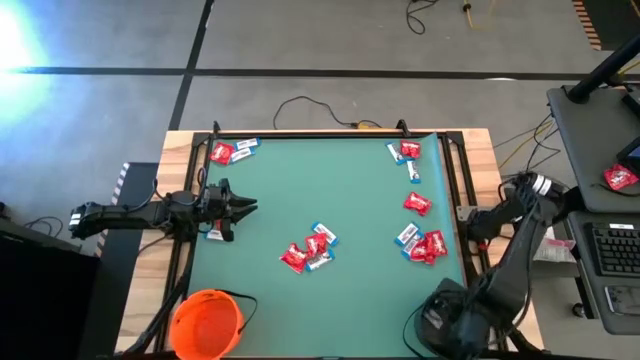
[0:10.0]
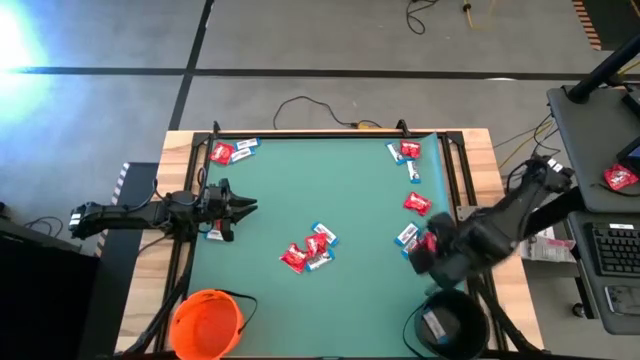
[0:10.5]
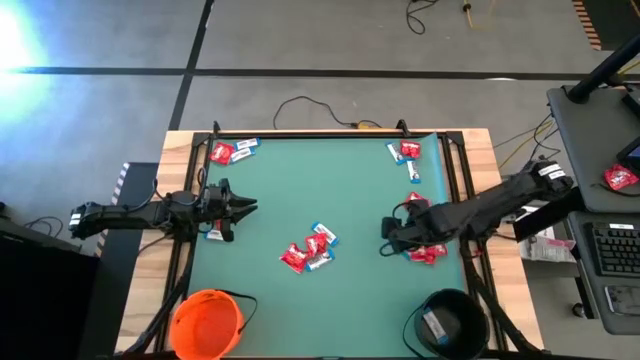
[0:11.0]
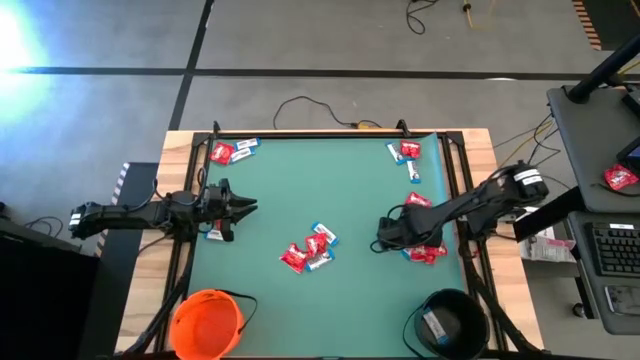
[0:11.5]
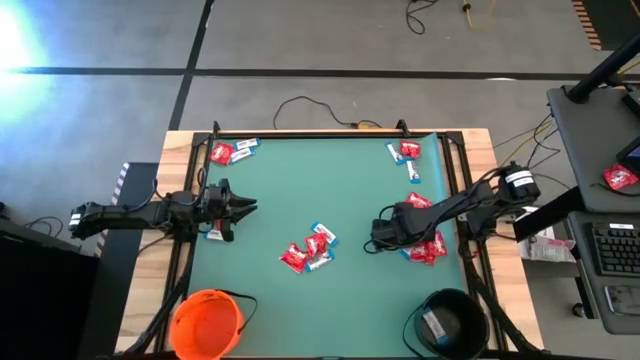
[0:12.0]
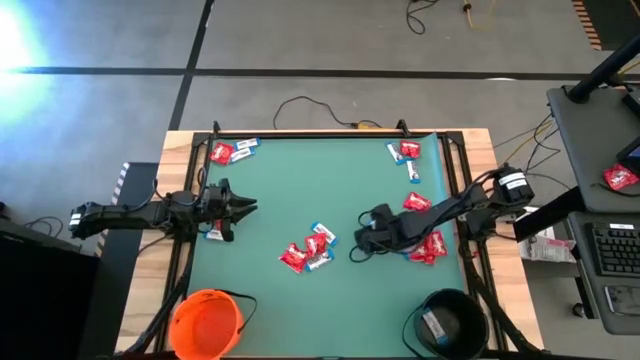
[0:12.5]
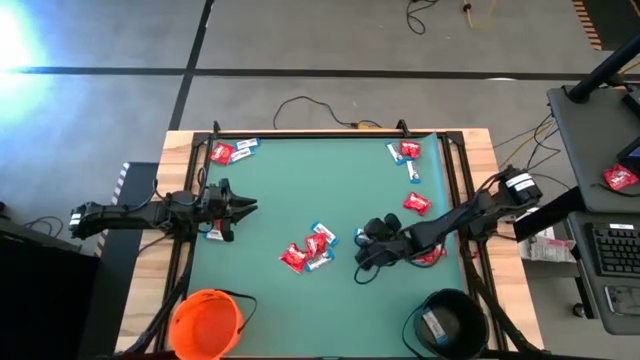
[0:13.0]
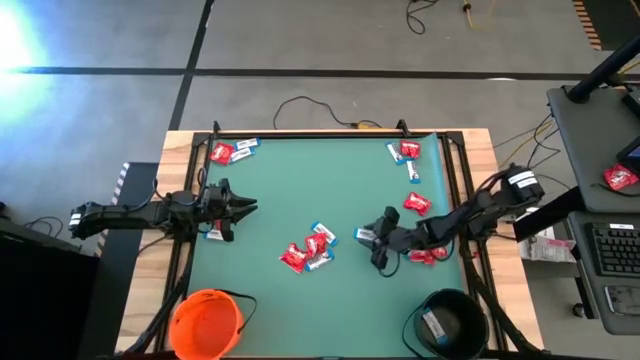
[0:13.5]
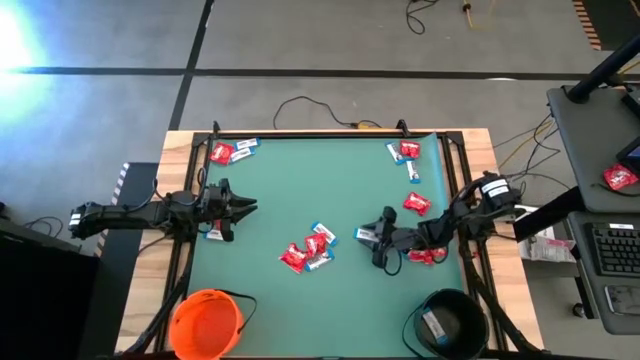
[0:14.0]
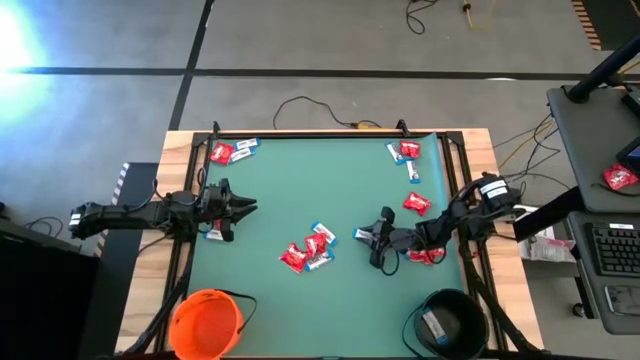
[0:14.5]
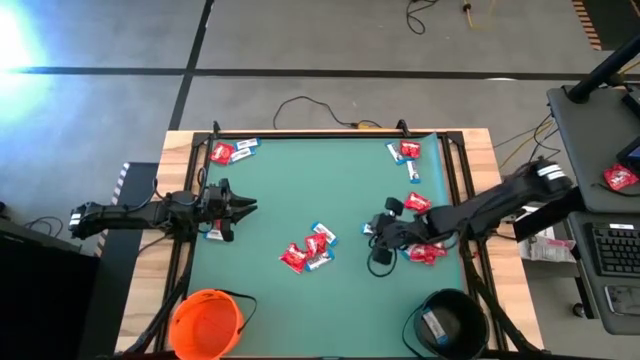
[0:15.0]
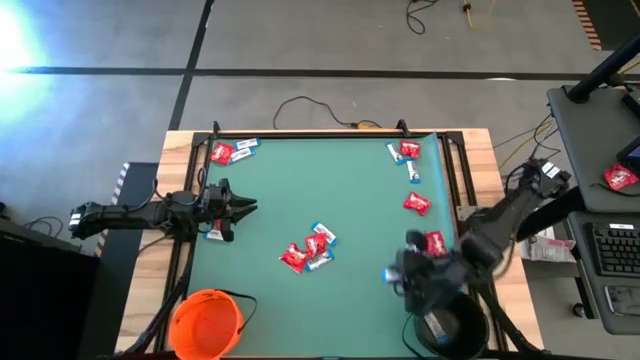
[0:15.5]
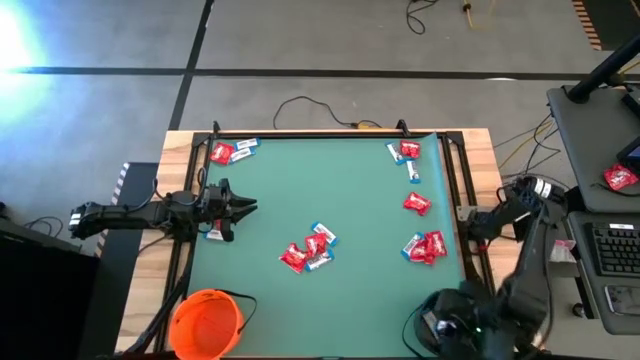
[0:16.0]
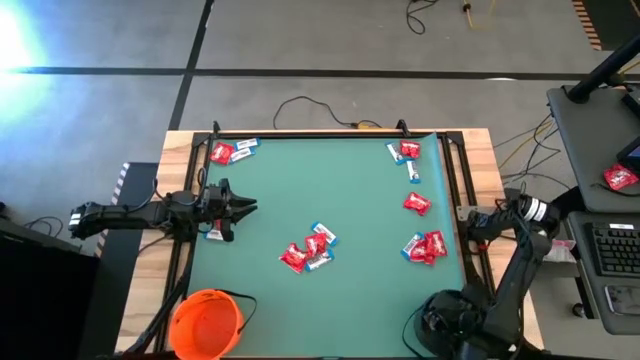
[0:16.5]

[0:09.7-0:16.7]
Task: Sort candy by brand, put in halloween buckets
Put the white chocolate into the black bucket

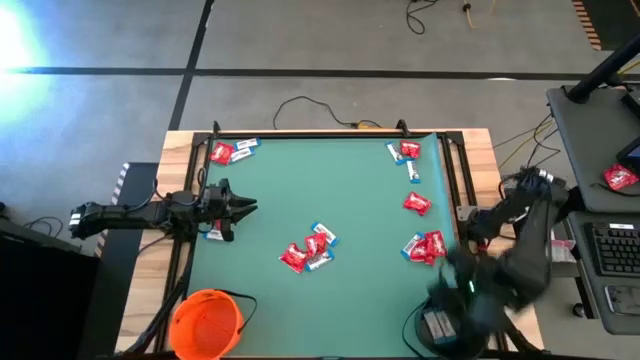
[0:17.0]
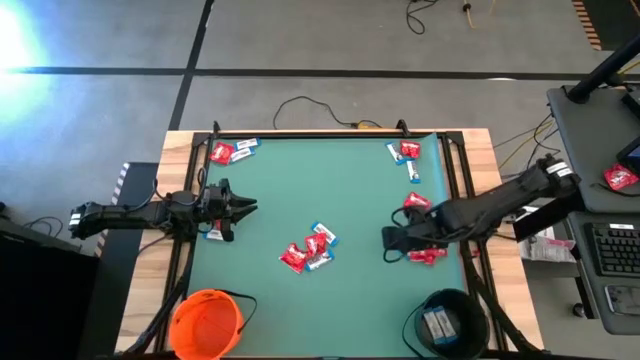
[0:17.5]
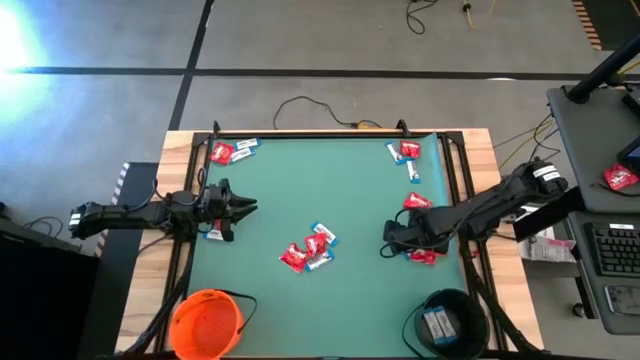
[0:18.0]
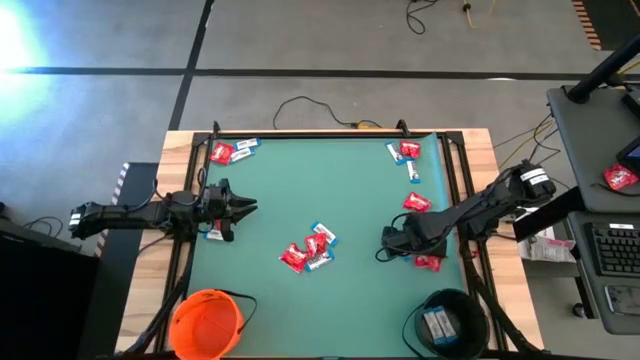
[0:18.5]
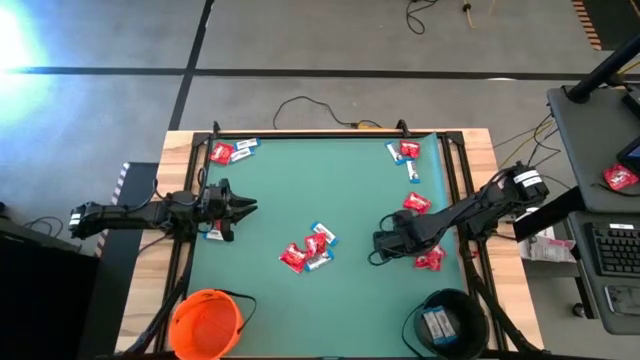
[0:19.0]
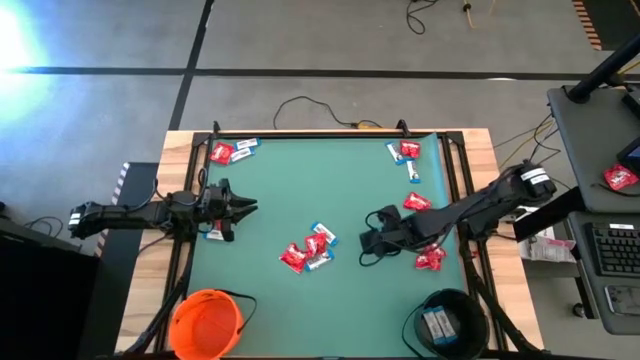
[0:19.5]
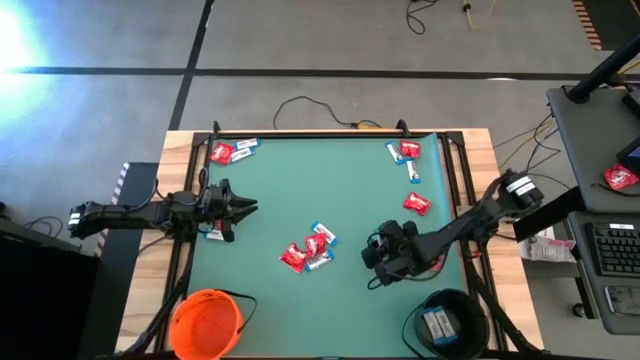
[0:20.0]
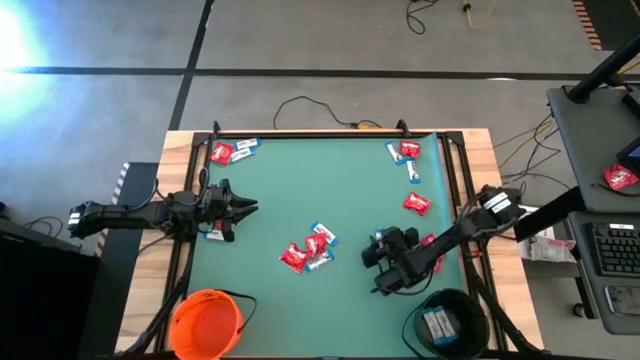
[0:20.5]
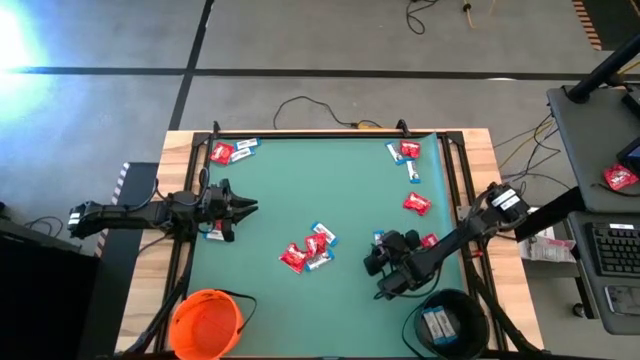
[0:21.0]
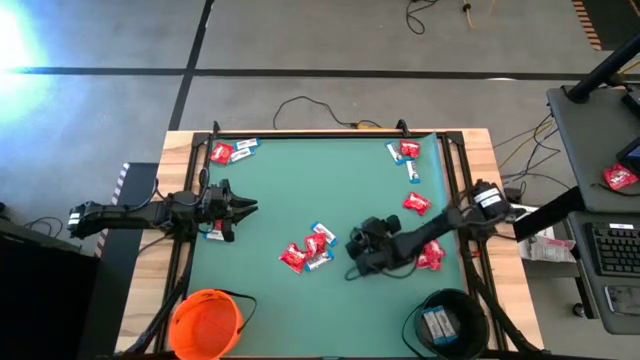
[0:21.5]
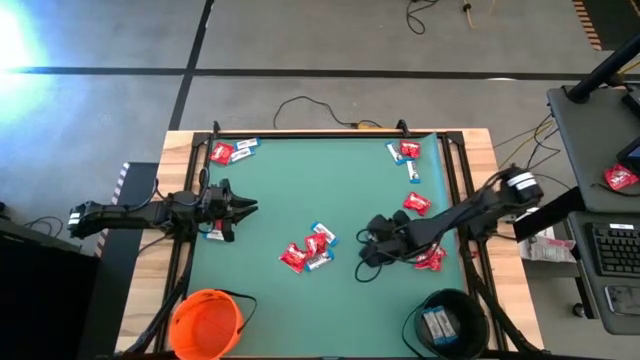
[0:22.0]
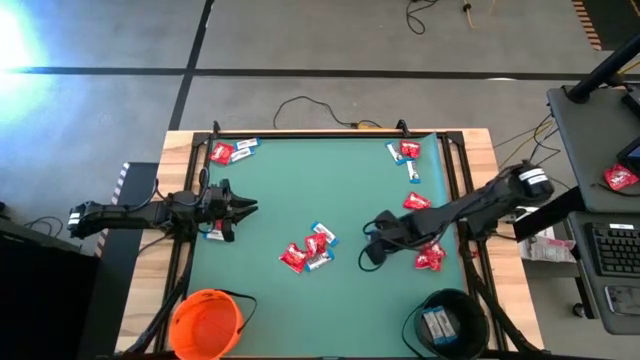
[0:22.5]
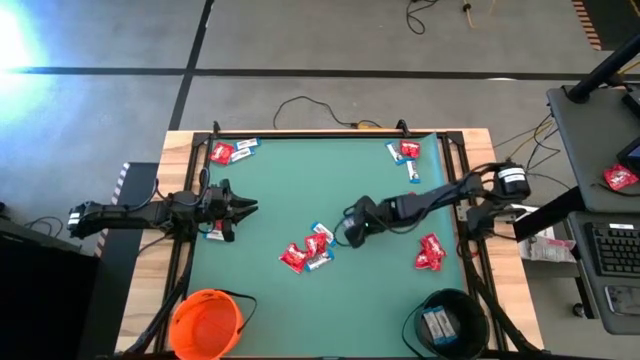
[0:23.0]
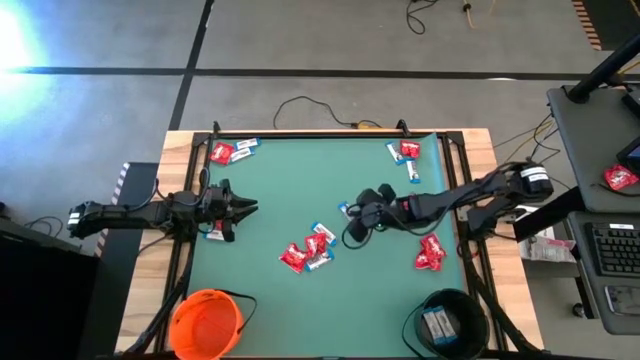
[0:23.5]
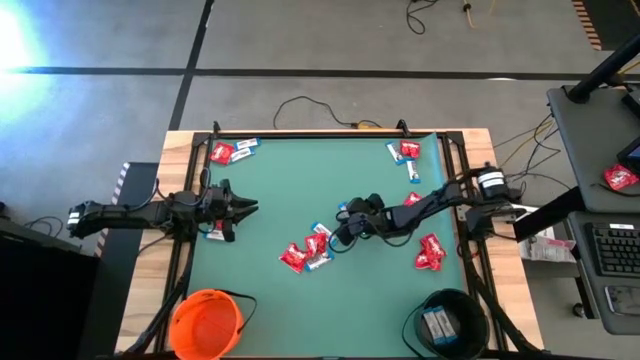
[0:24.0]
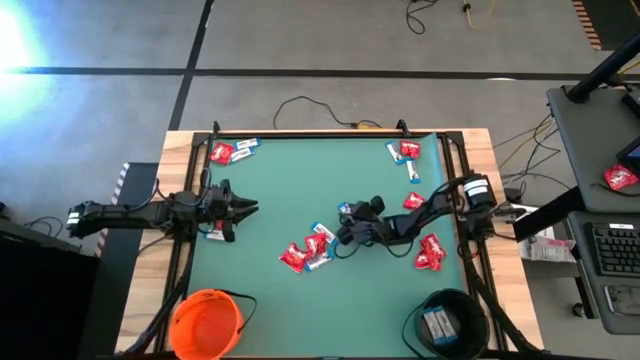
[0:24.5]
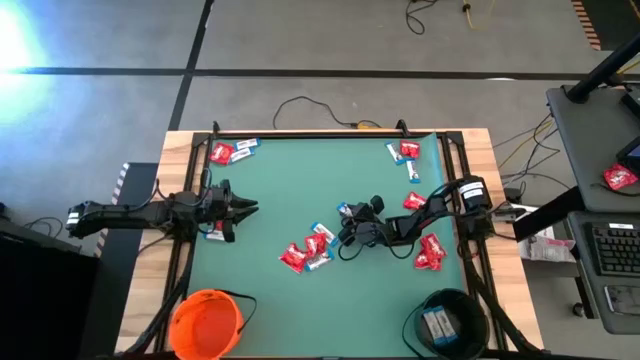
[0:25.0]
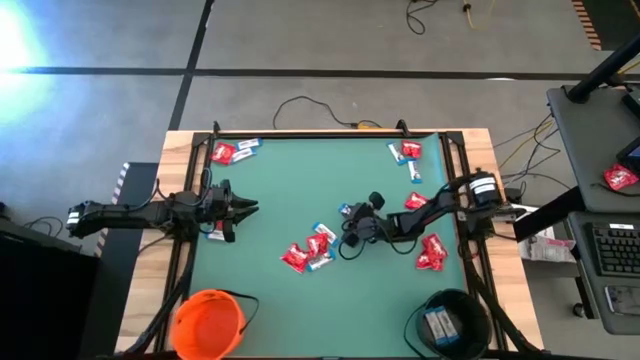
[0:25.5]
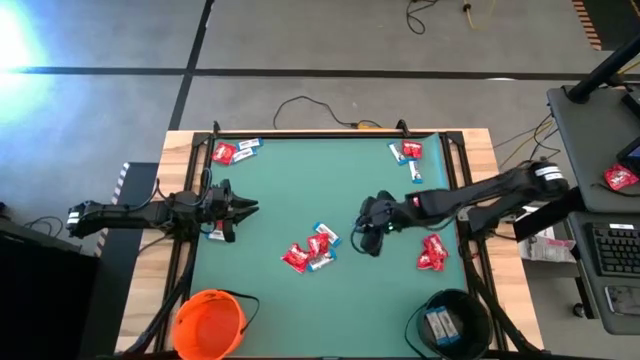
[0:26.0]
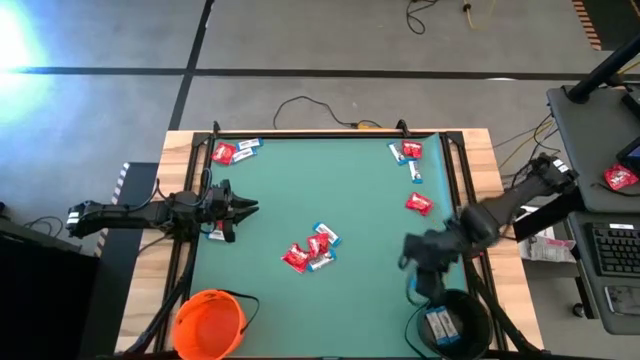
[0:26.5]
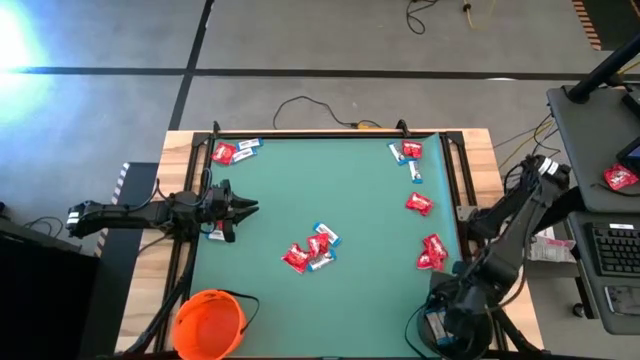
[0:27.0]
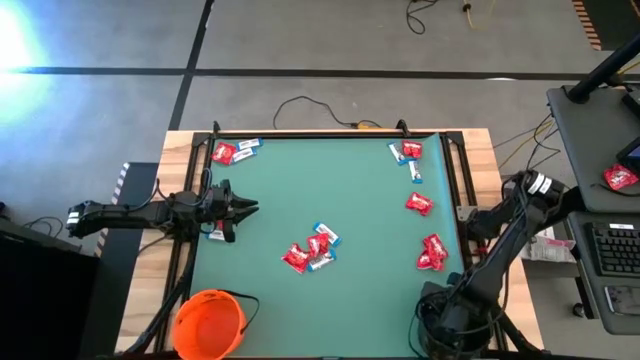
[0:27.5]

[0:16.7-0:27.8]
Put the white chocolate into the black bucket

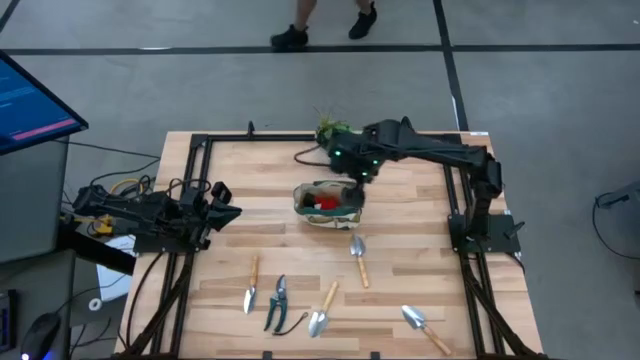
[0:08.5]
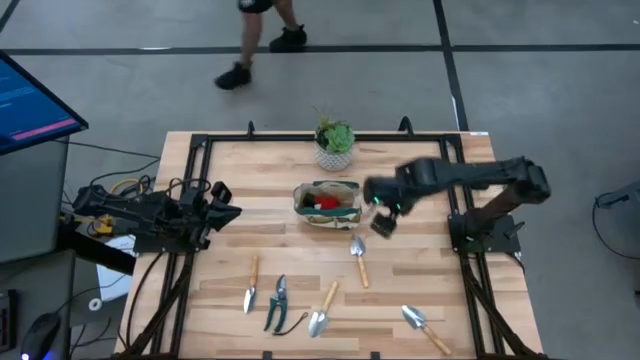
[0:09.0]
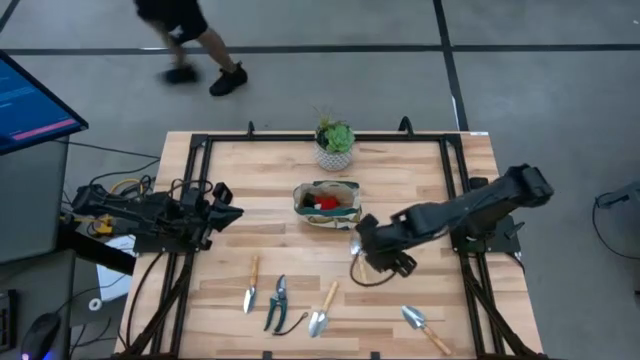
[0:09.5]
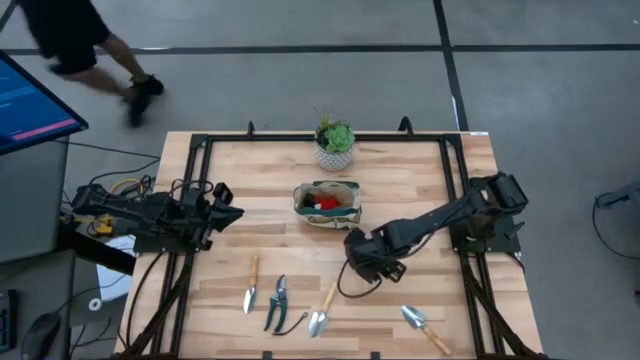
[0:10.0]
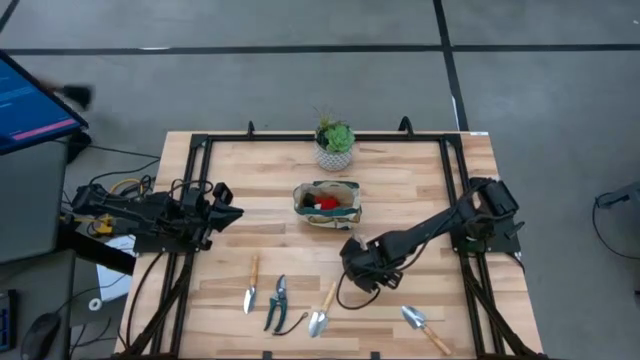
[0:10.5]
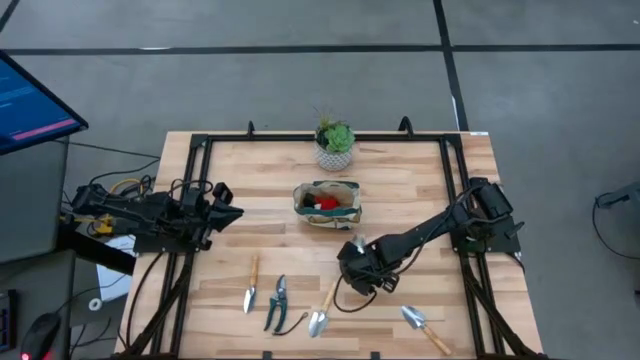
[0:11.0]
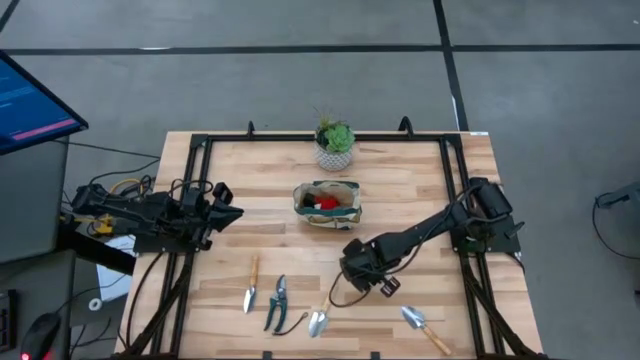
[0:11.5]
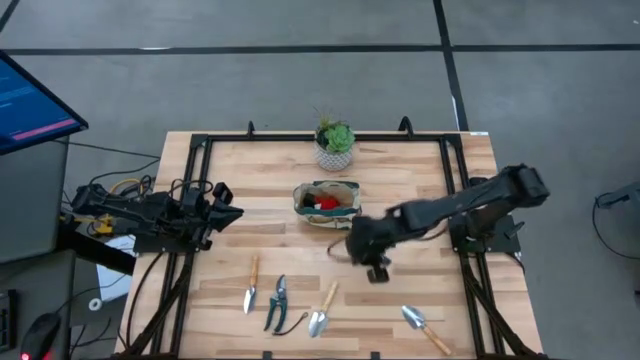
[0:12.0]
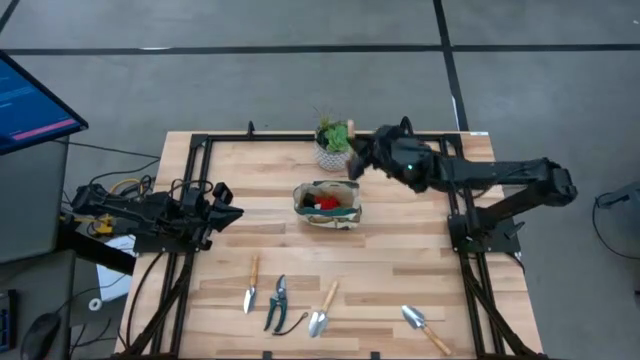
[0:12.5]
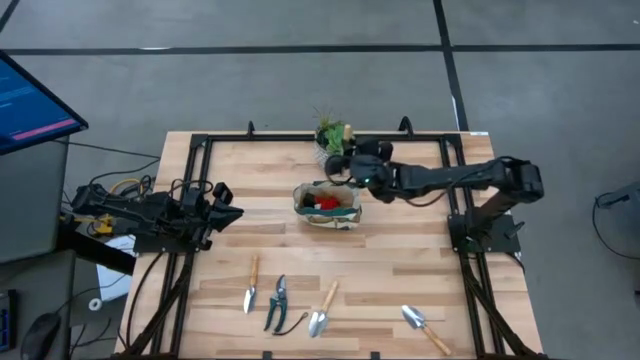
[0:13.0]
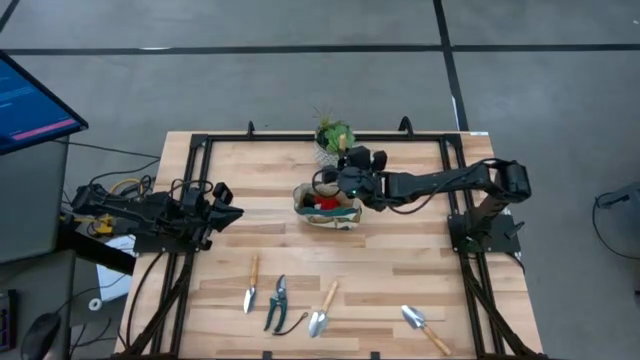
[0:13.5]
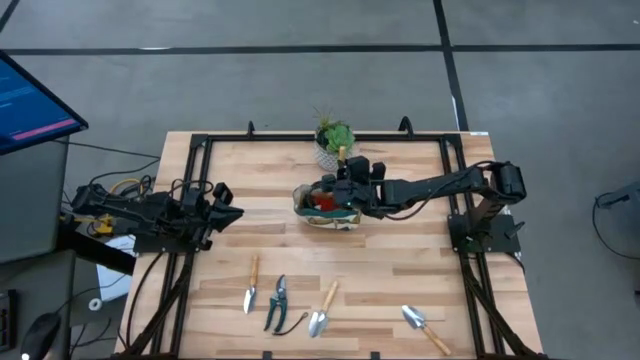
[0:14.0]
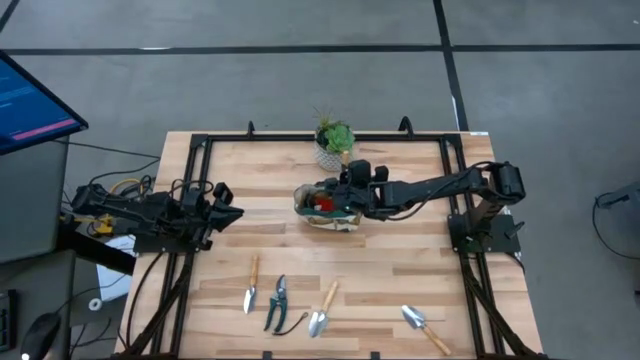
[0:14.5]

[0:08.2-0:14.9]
Task: Pick & Place Garden tools in Gardening bag
Put the trowel into the gardening bag
